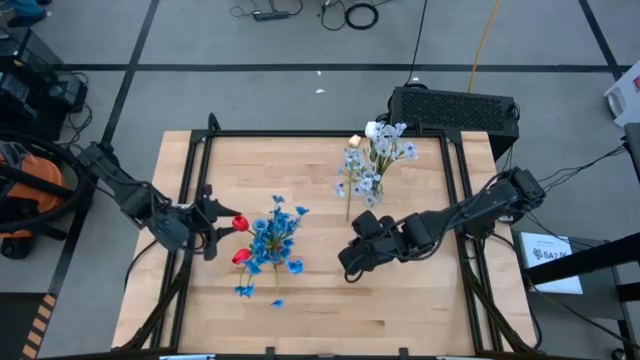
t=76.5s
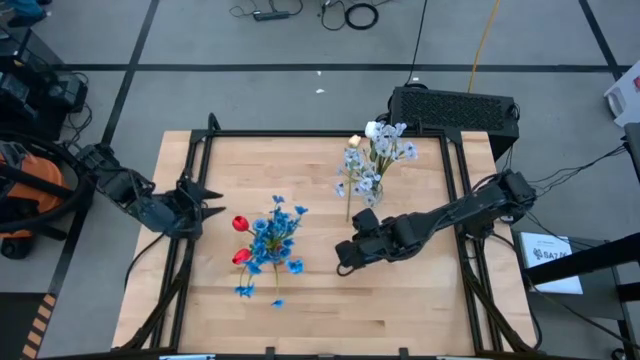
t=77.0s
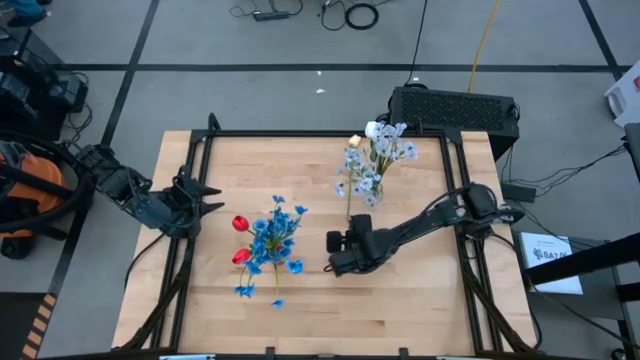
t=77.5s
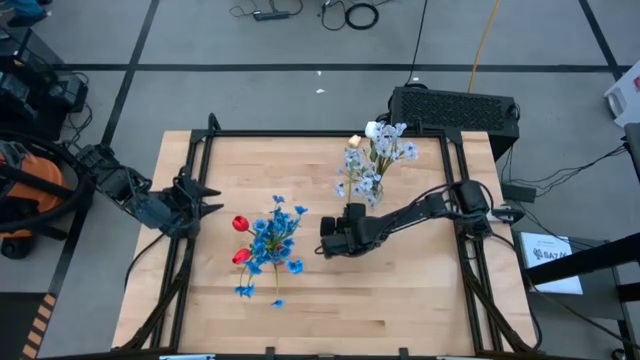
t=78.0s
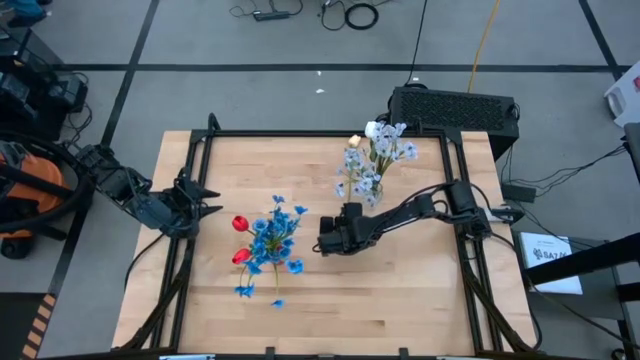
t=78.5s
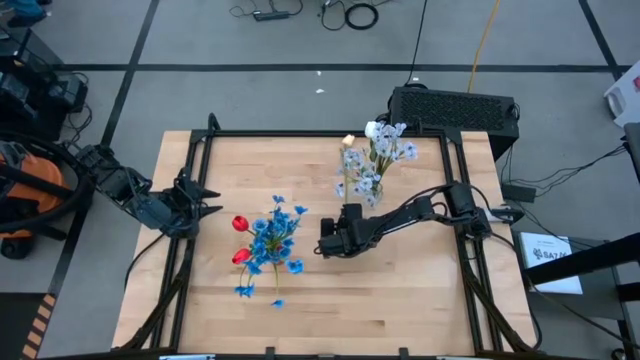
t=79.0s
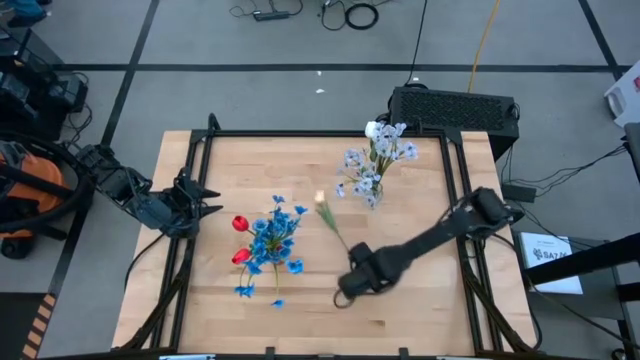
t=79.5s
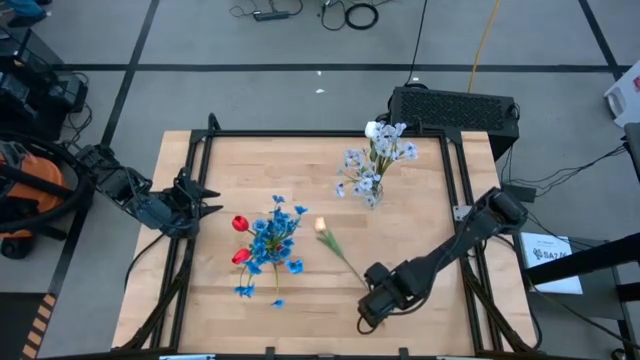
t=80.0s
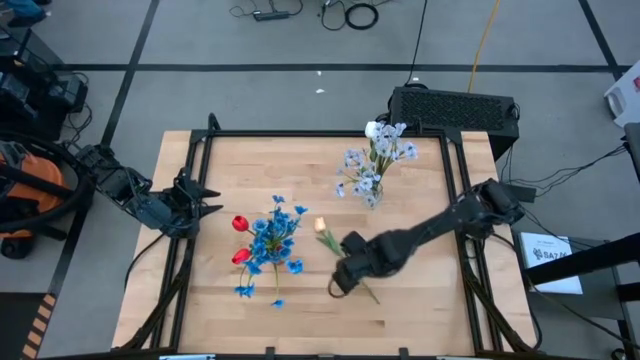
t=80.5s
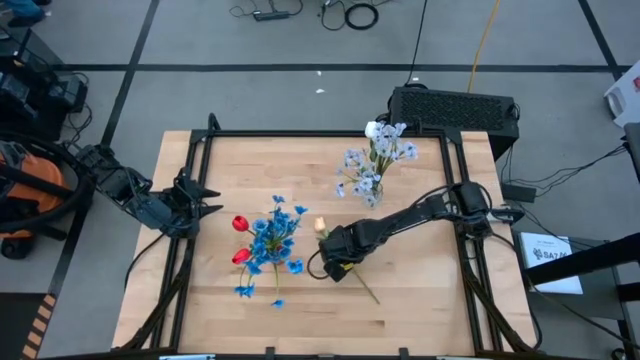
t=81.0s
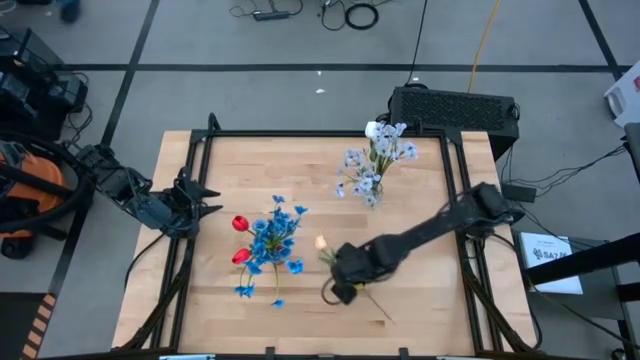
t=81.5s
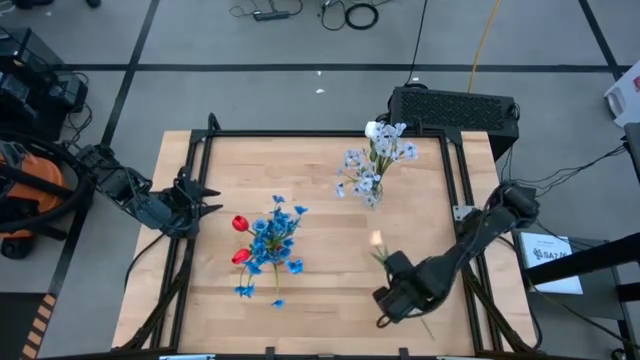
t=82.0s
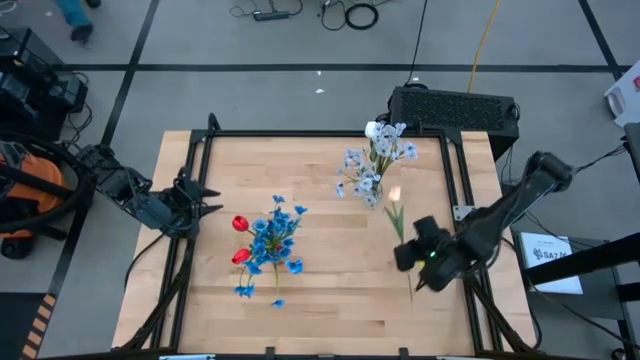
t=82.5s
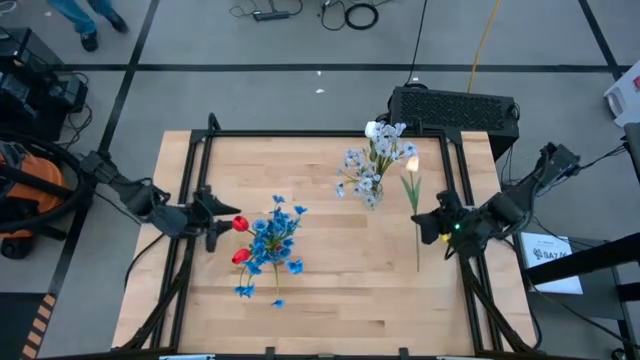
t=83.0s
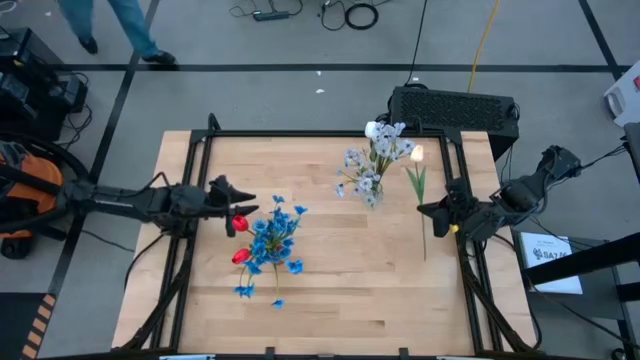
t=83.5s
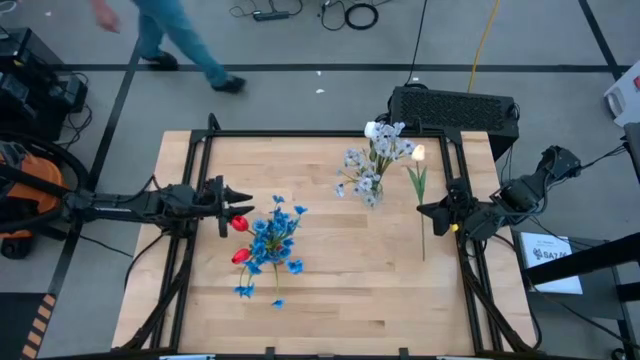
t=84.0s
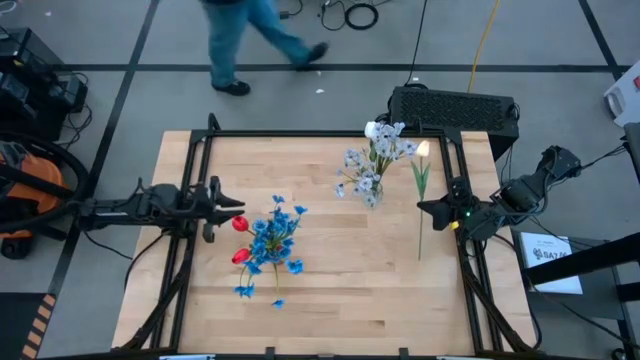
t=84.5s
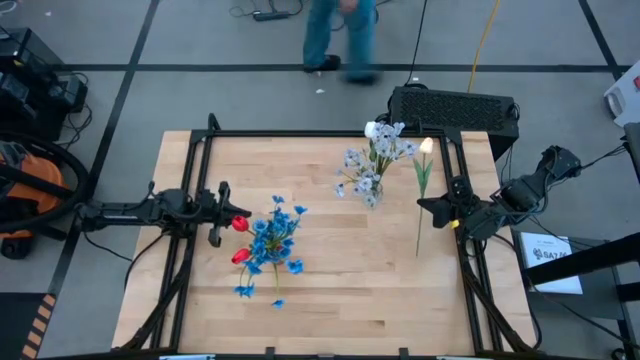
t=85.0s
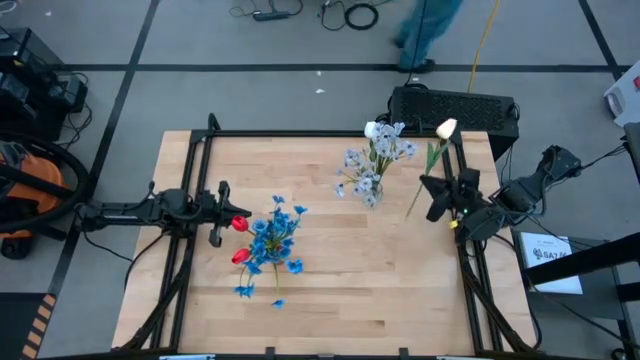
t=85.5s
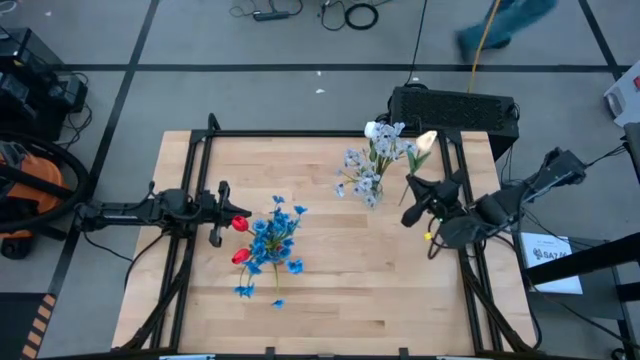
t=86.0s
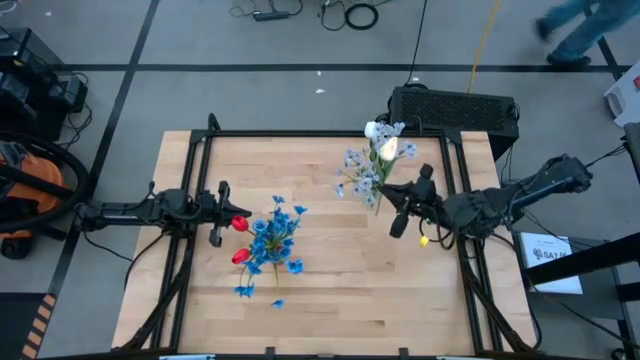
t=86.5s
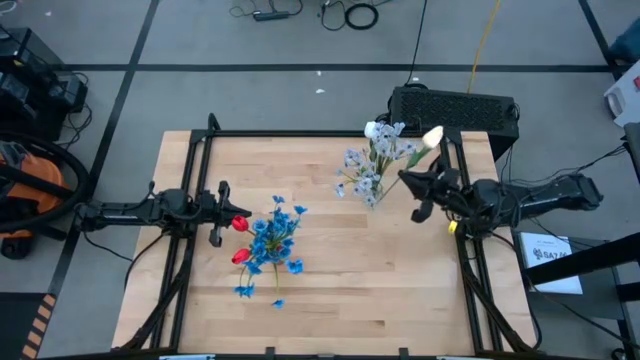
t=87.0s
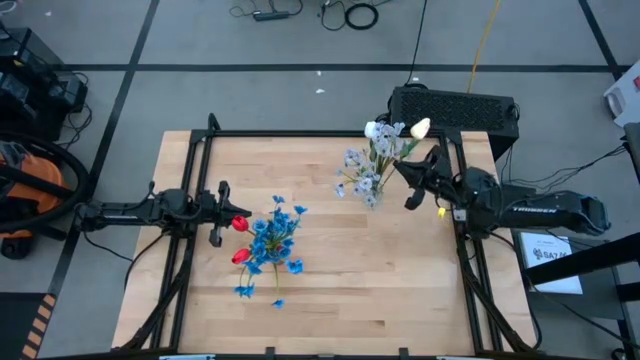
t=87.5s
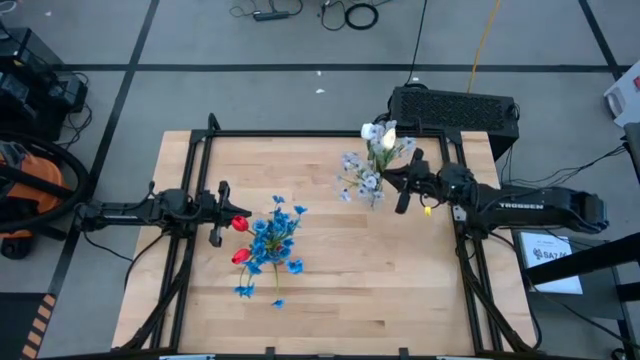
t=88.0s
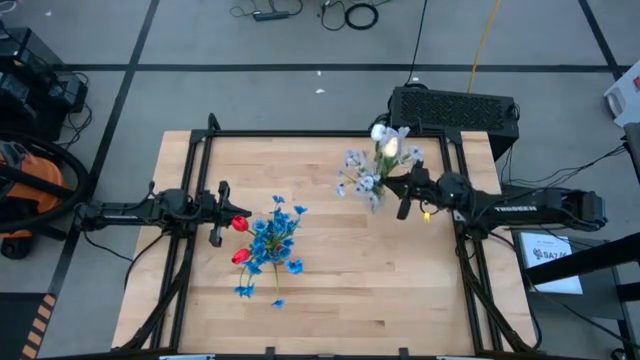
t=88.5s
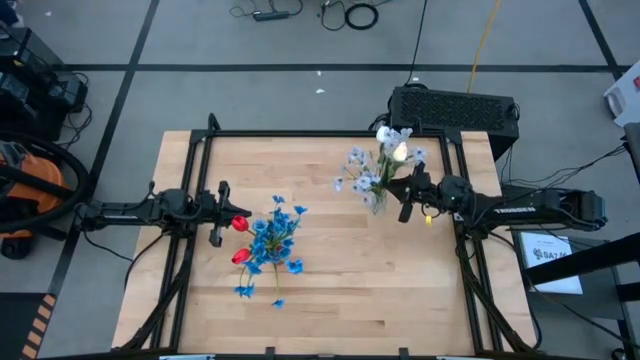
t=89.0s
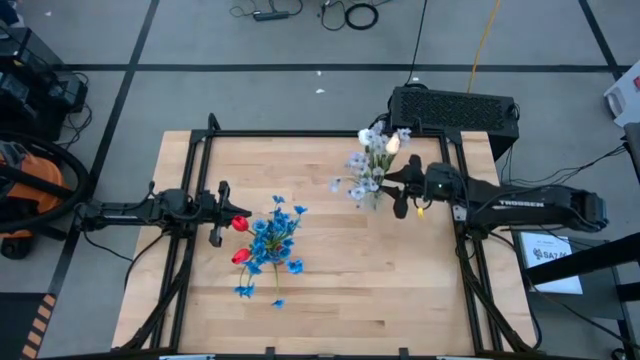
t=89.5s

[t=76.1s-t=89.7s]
Task: Sort flowers into vase by color
Put the pink tulip into the transparent vase

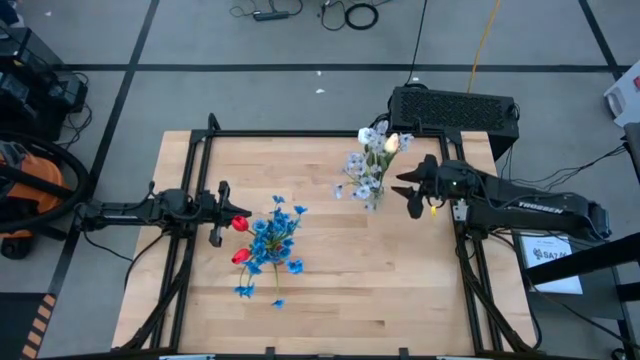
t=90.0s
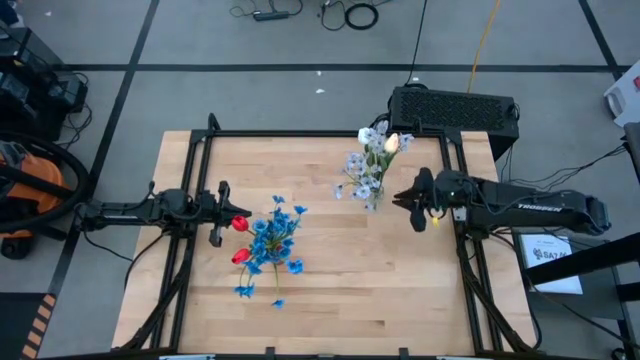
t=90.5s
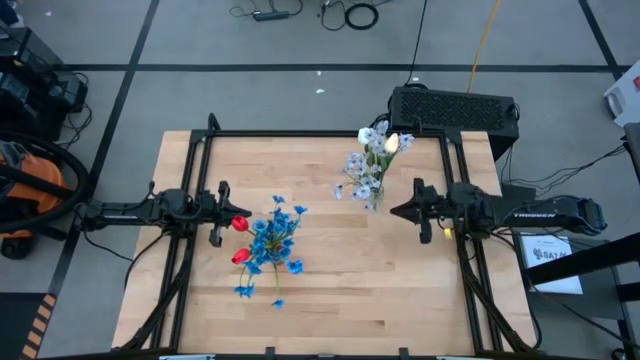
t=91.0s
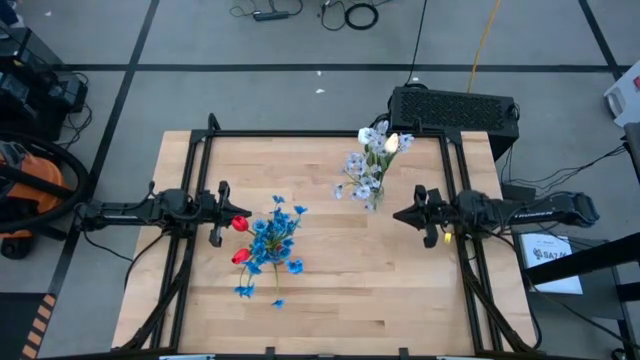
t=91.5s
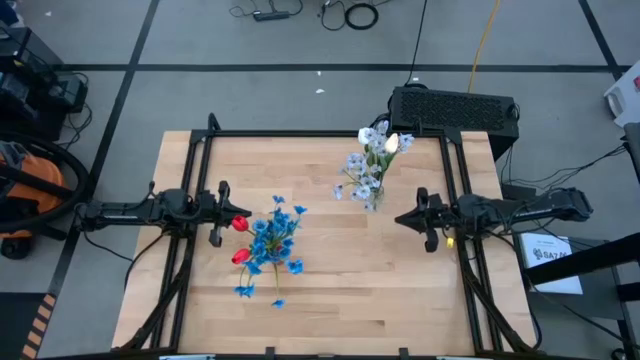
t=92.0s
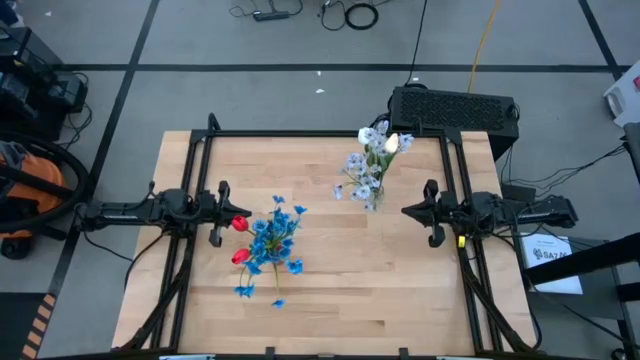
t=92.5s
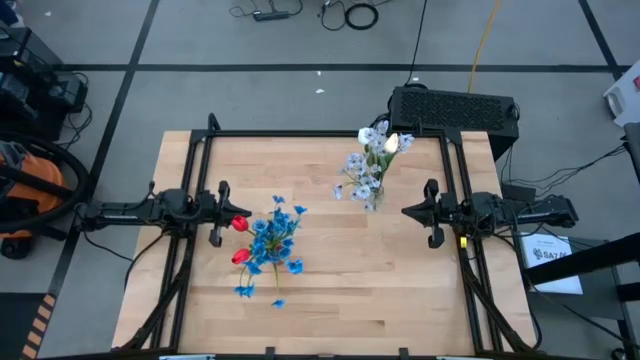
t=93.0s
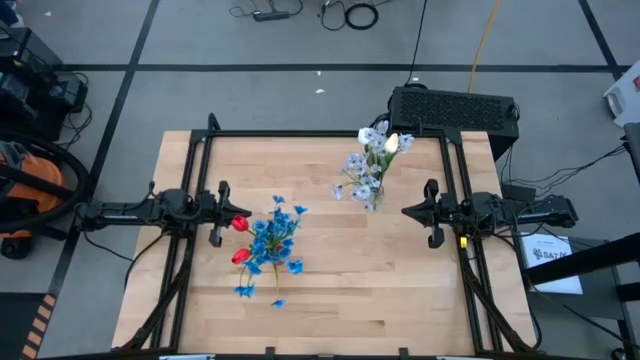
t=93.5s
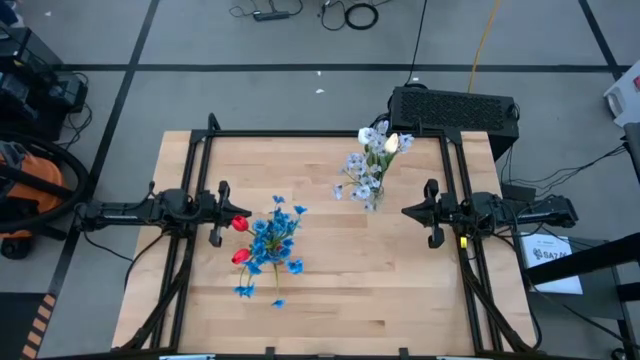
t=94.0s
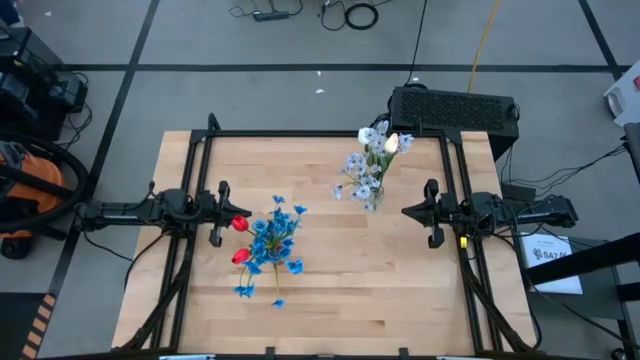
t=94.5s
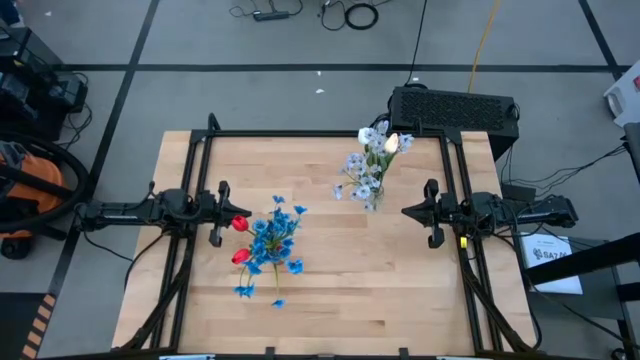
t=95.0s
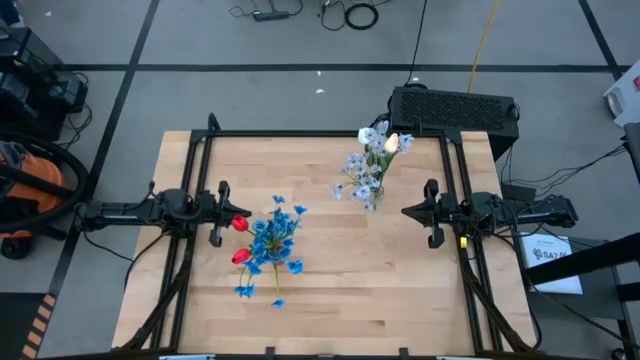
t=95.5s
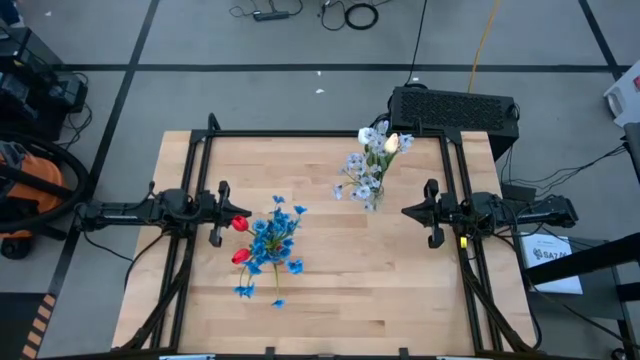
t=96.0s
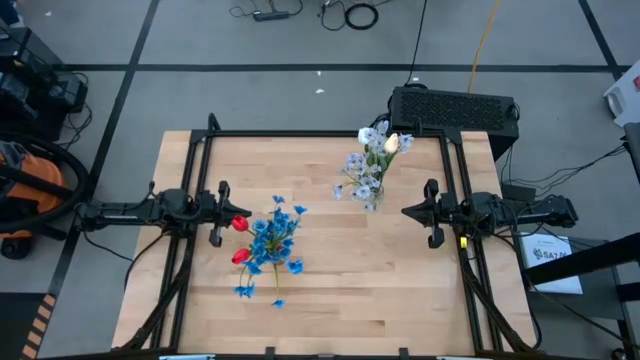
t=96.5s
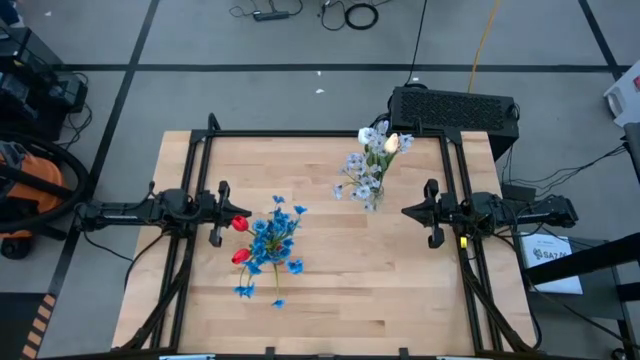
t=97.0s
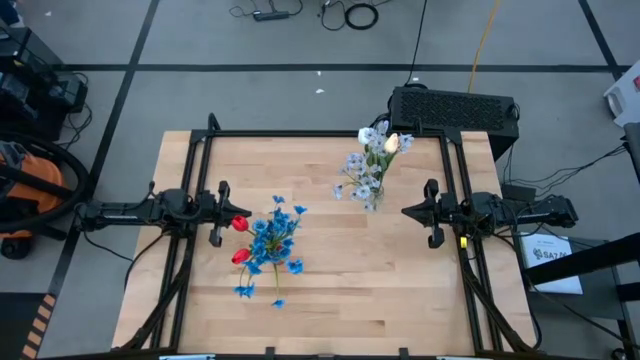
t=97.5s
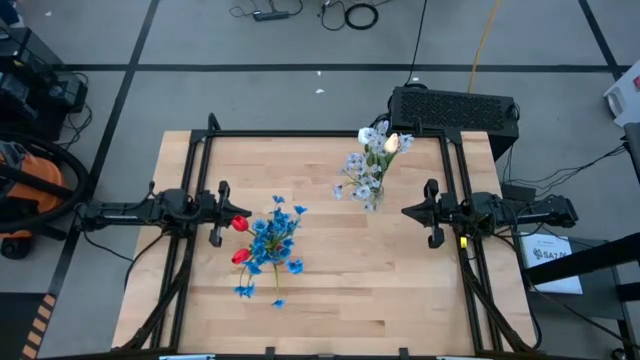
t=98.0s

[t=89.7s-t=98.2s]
Return to Home Position

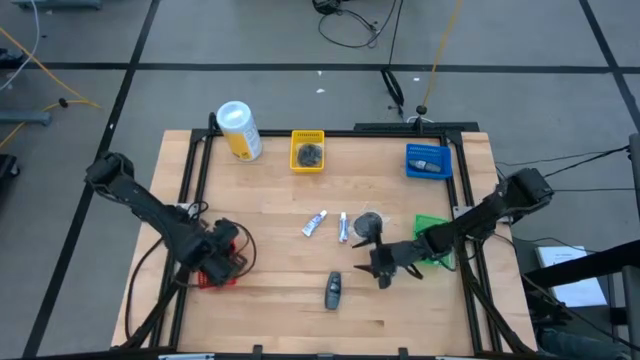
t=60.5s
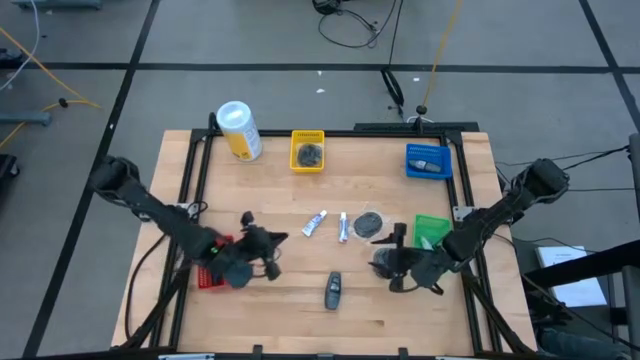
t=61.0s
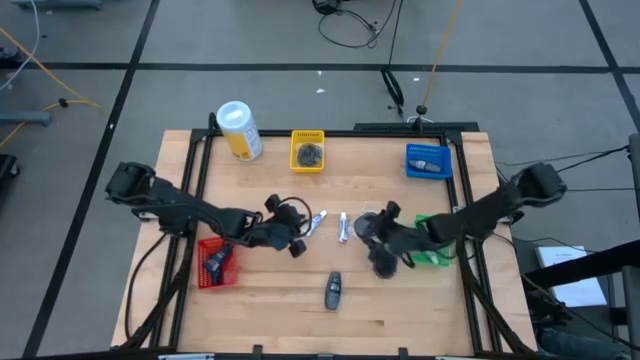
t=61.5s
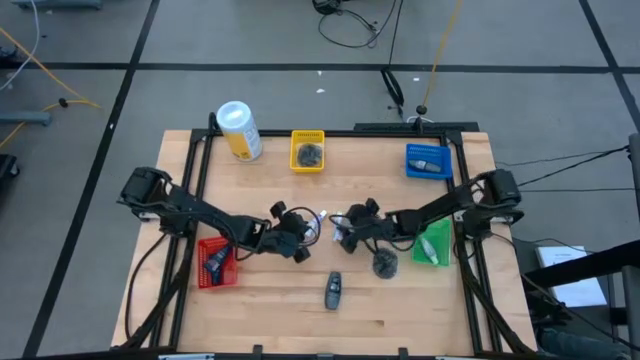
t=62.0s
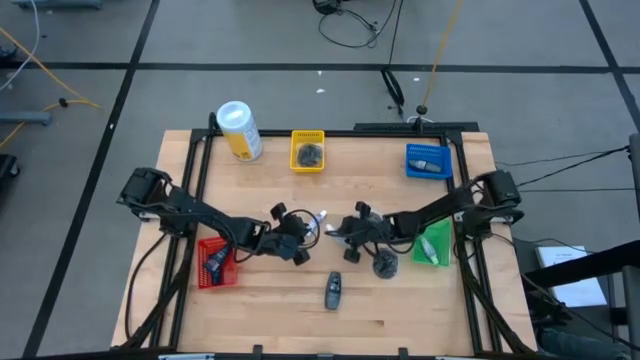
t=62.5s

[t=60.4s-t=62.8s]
Task: Pick & Place Travel size toiletries
Put the toothpaste into the green bin
